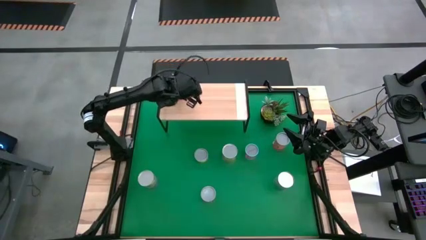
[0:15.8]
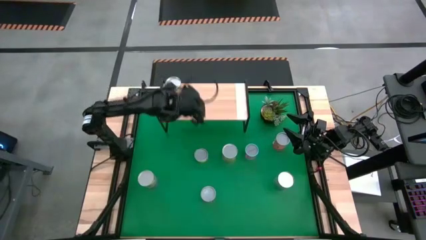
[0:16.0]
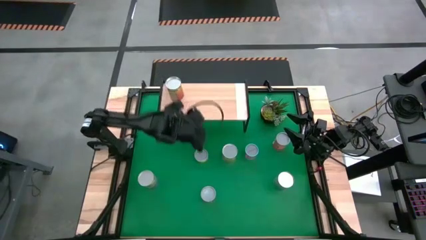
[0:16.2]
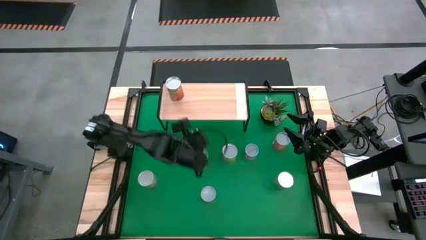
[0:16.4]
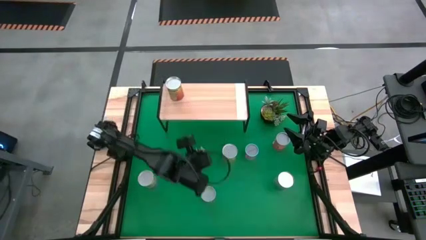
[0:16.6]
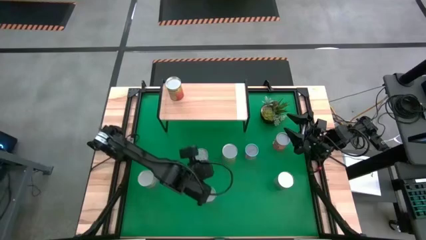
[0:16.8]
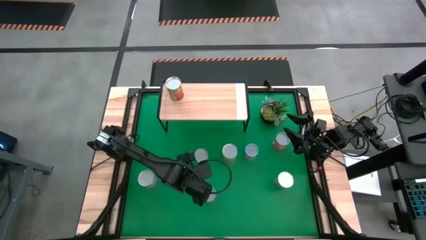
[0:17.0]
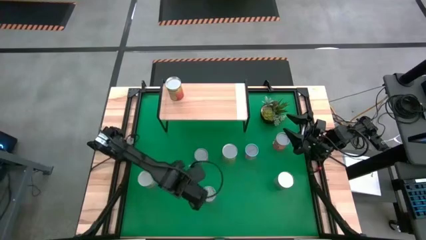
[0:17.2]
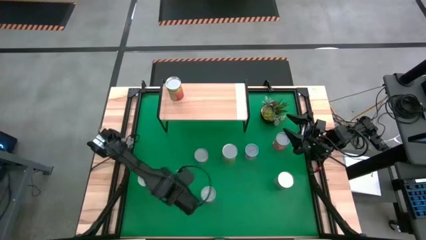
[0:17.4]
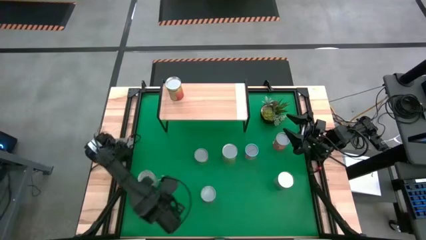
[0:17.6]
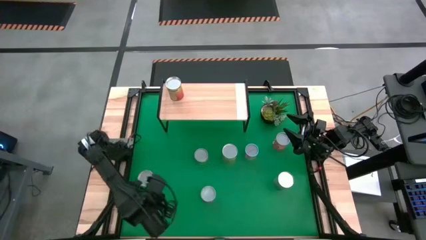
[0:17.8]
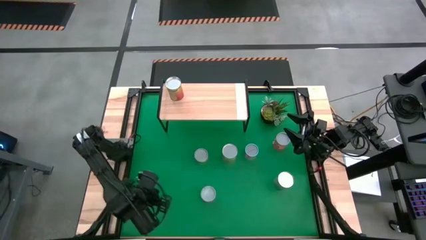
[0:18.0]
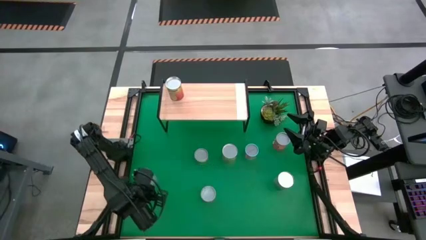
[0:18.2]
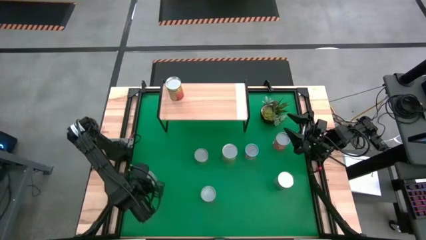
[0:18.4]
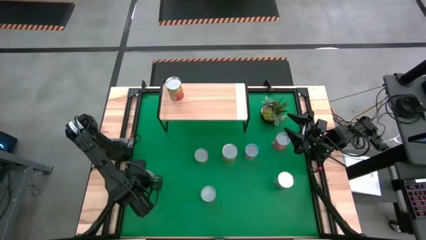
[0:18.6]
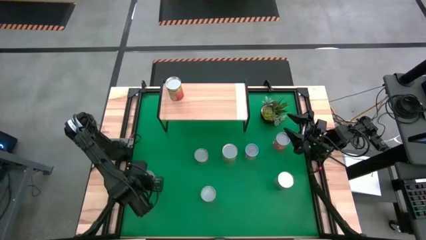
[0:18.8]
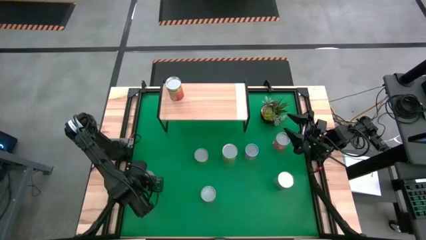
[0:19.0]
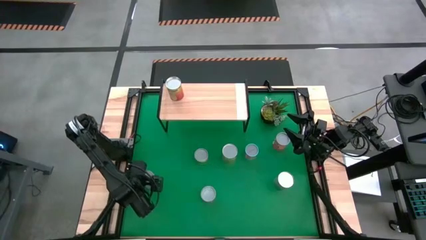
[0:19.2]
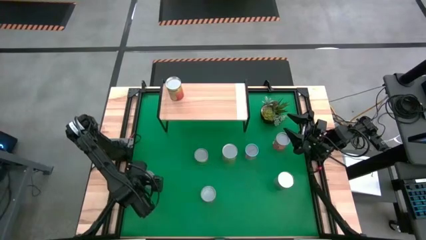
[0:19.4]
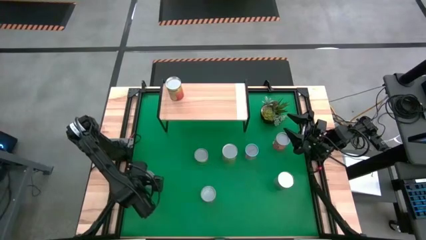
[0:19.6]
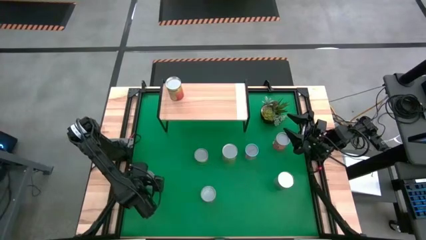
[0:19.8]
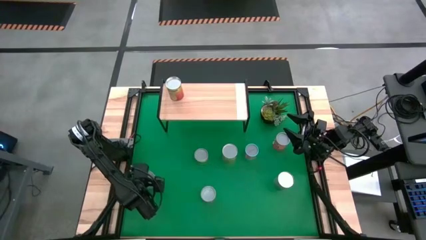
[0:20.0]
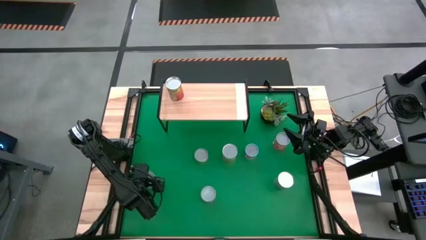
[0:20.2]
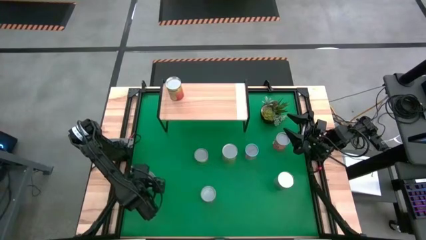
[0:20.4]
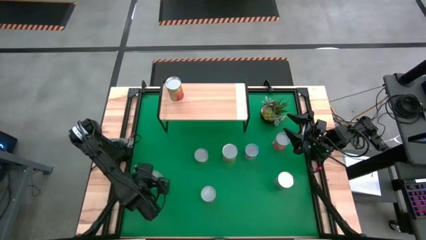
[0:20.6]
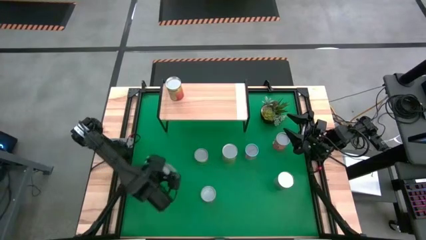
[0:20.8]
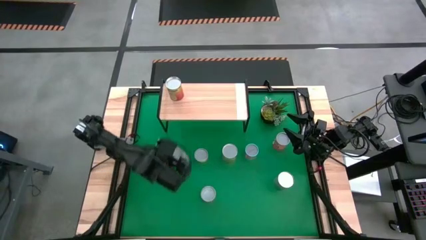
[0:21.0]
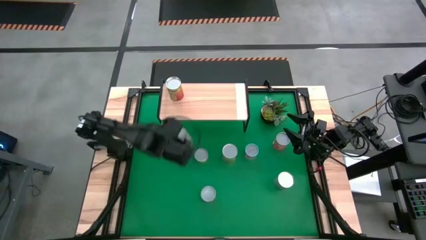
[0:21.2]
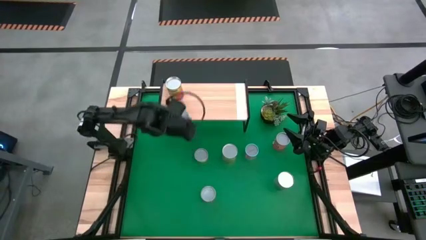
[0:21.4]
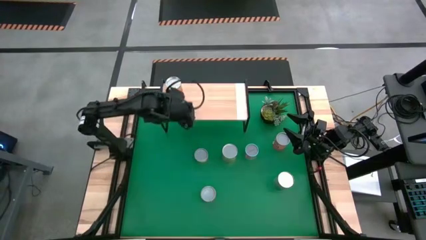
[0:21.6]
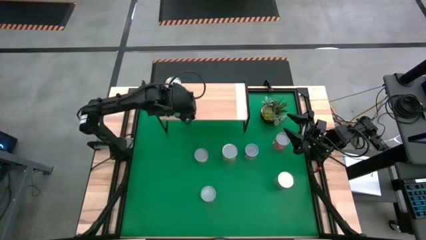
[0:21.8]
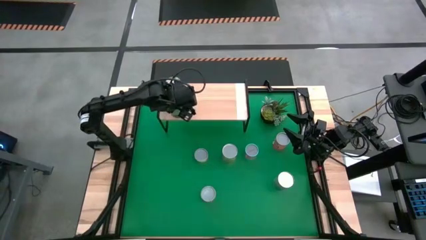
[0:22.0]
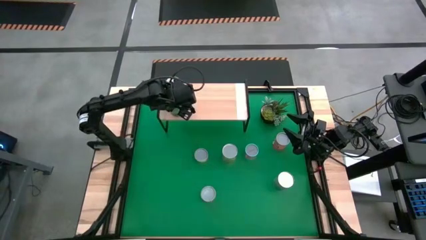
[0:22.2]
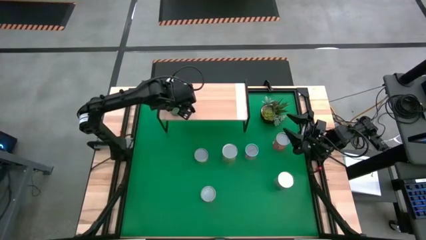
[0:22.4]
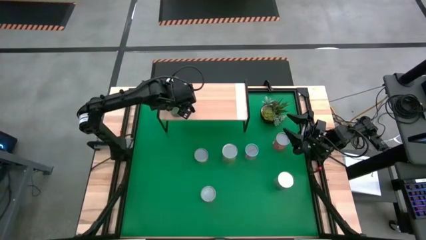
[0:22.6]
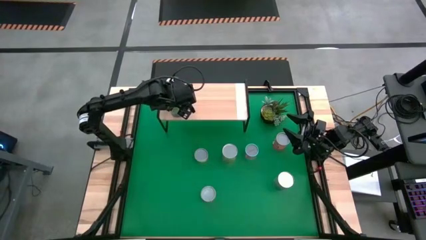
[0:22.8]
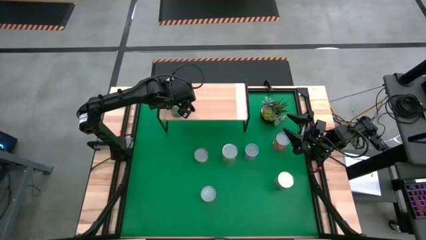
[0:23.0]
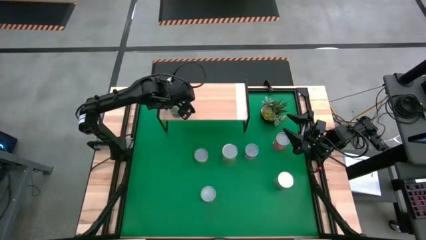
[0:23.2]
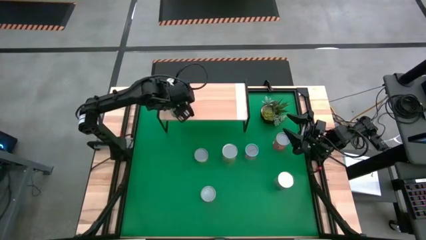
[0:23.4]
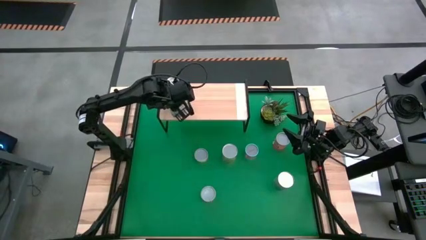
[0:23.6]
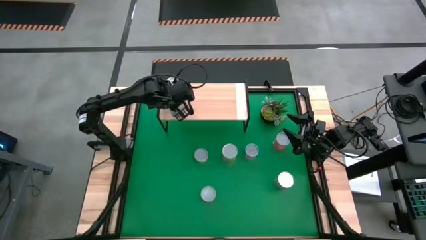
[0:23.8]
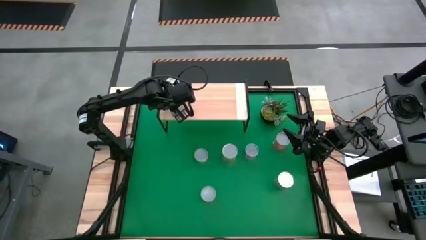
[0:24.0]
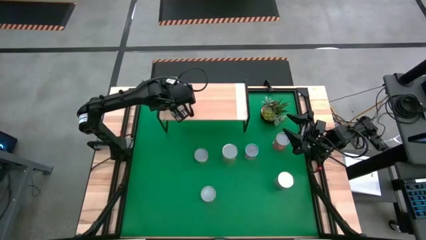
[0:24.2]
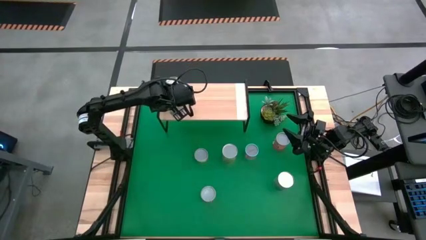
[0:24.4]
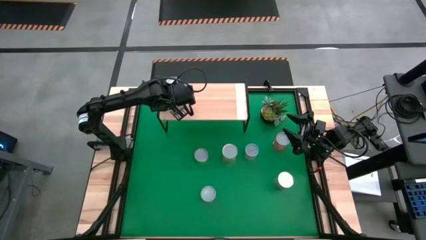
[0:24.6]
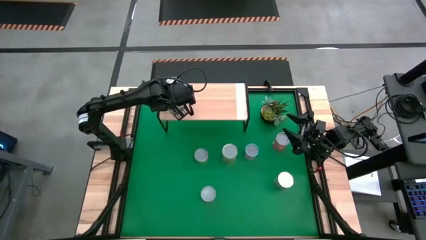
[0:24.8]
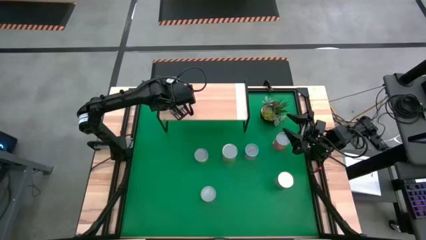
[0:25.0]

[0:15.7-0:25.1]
Task: Pick and place cans onto a shelf
Put the big blue can on the shelf aligned with the other big orange can
